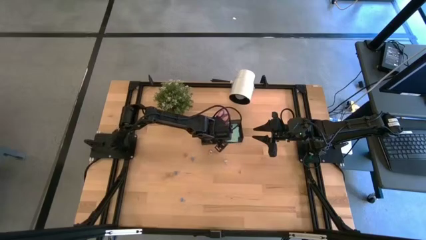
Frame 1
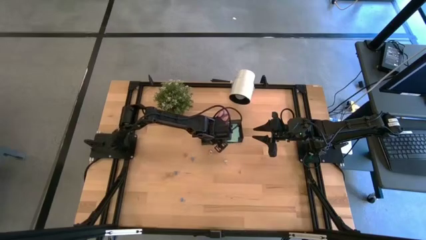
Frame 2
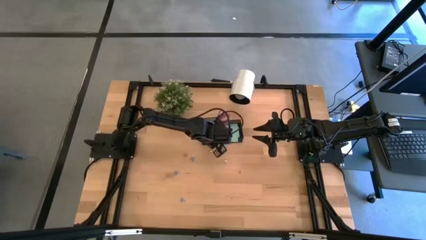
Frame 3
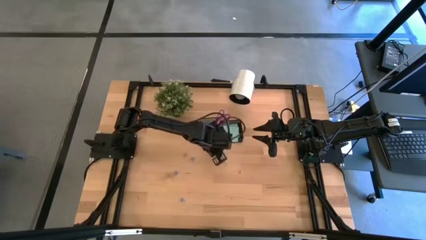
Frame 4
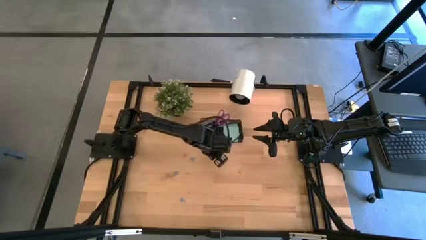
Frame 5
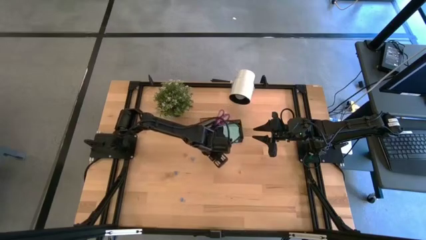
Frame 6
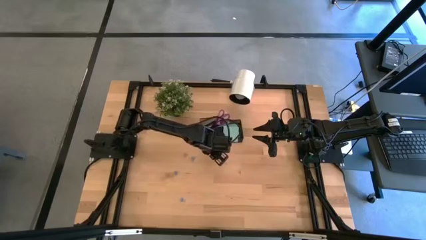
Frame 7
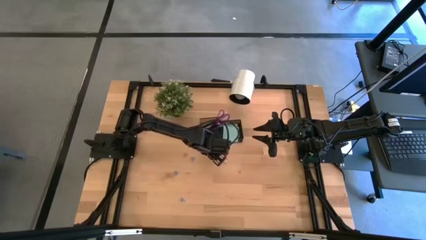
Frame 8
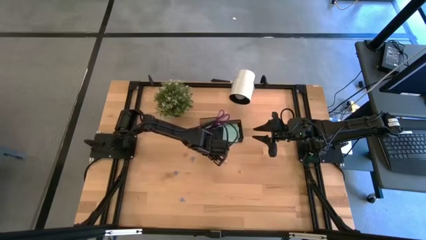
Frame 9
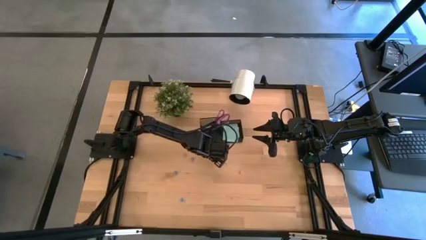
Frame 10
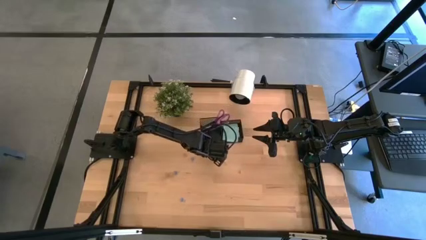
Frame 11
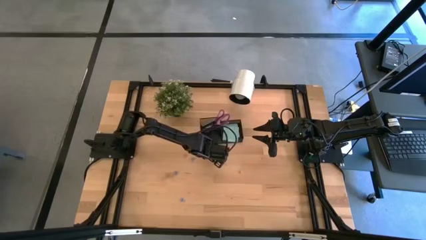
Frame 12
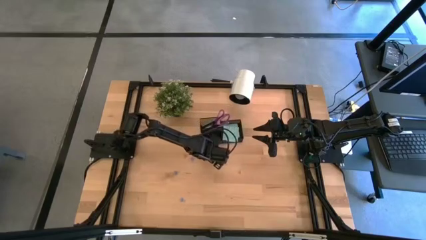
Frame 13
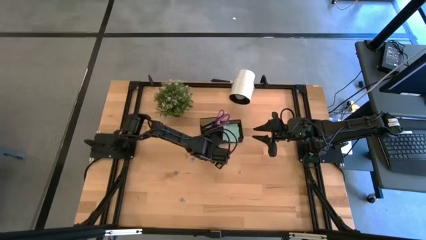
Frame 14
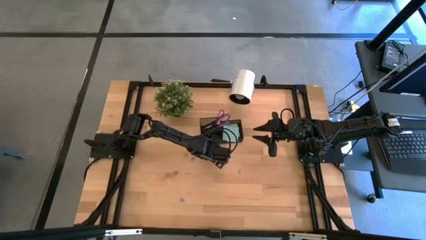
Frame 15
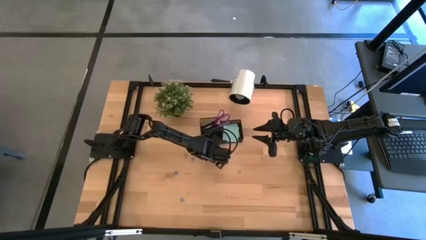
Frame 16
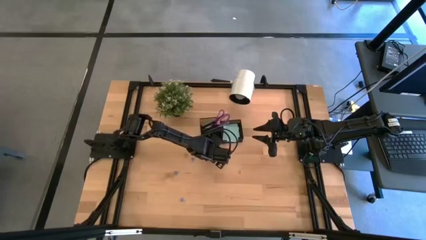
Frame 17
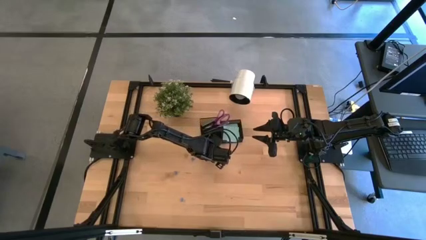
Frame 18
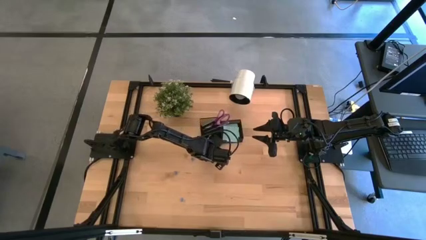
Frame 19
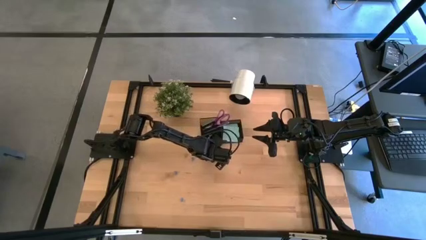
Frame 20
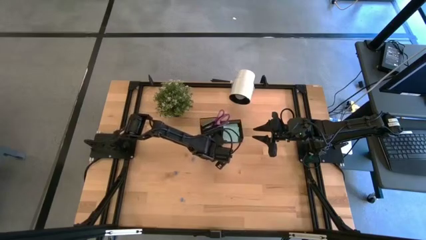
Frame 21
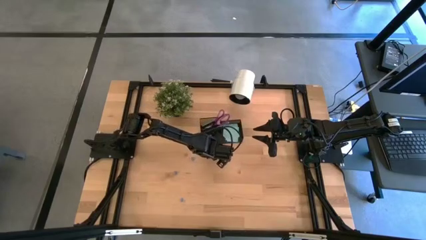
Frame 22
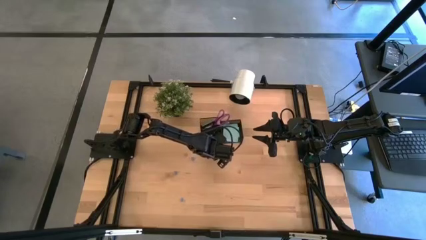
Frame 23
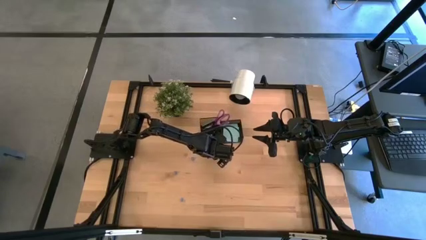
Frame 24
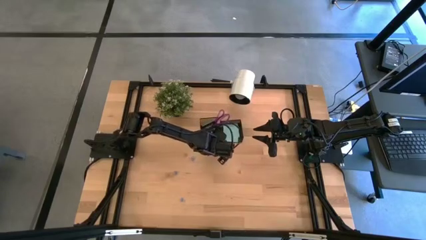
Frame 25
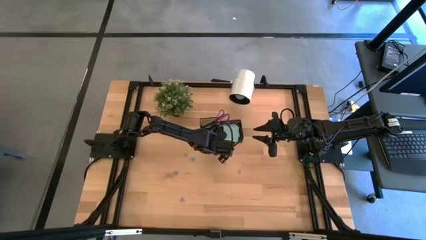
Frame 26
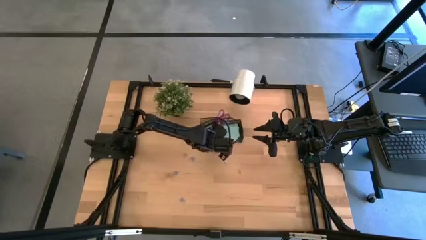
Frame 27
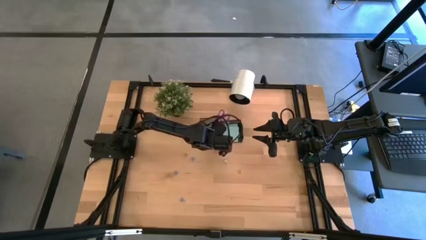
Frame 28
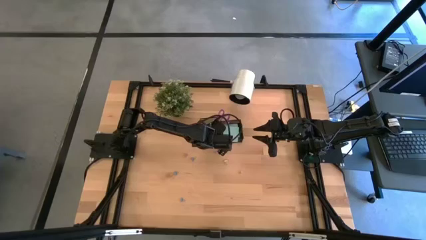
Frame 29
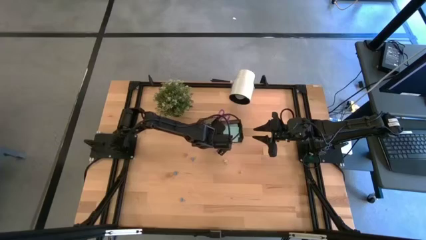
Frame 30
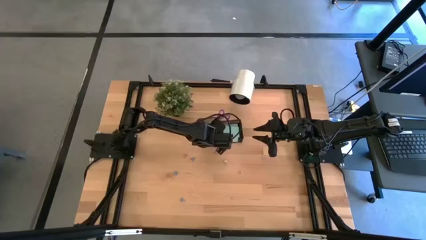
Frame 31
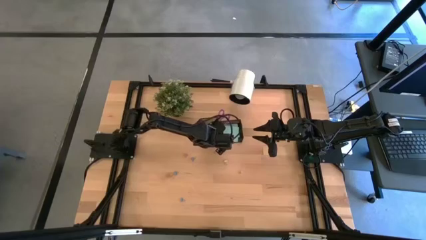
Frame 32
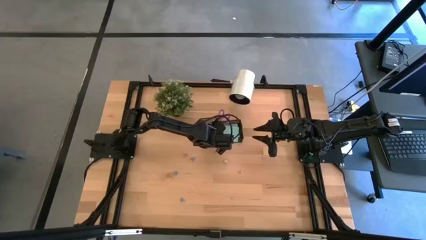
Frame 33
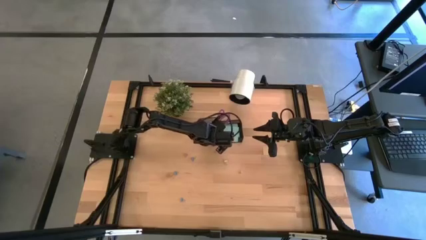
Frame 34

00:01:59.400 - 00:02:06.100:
Task: Pick and place office supplies into organizer
Put the pink binder clip into the black desk organizer

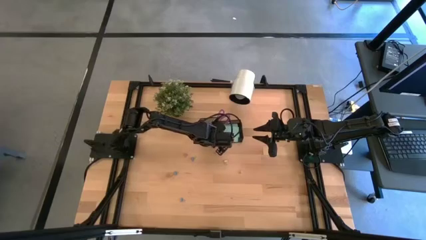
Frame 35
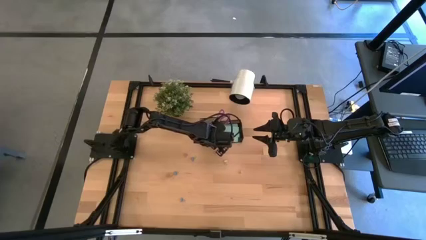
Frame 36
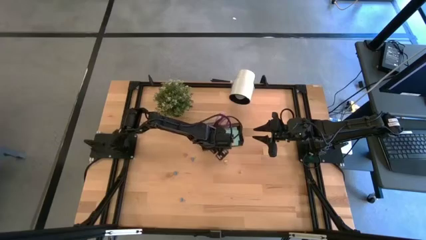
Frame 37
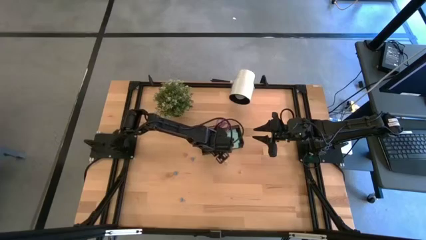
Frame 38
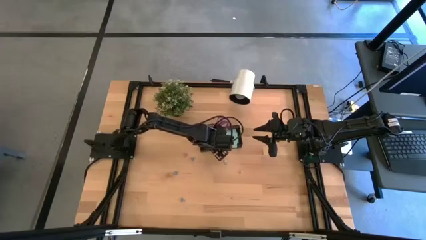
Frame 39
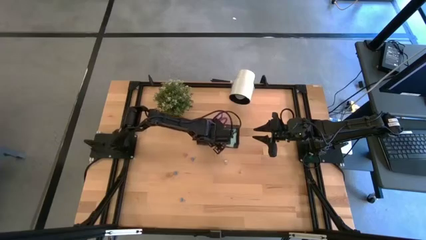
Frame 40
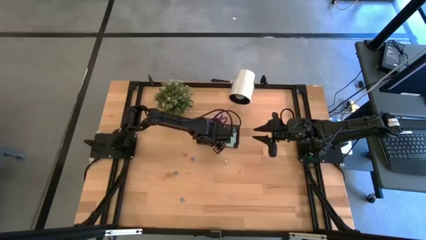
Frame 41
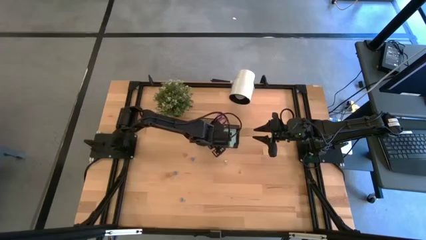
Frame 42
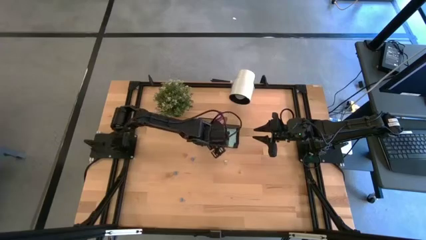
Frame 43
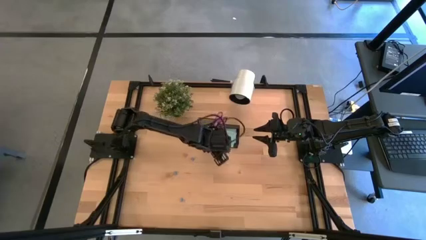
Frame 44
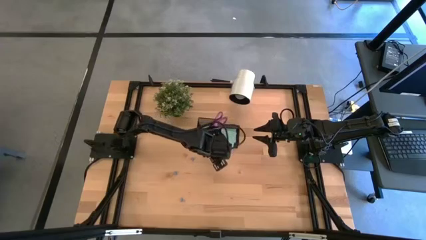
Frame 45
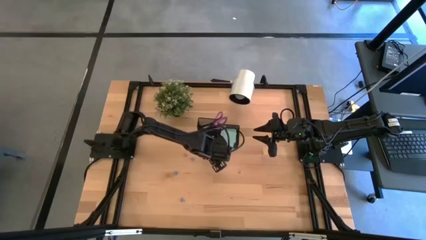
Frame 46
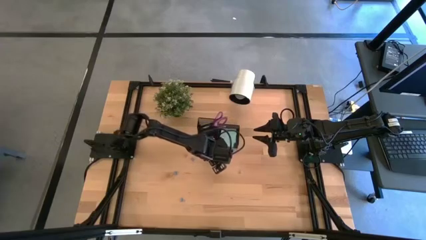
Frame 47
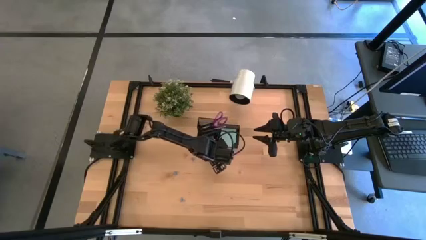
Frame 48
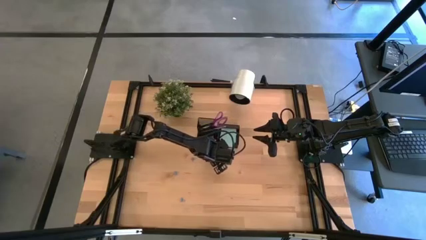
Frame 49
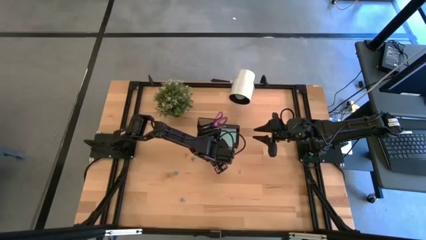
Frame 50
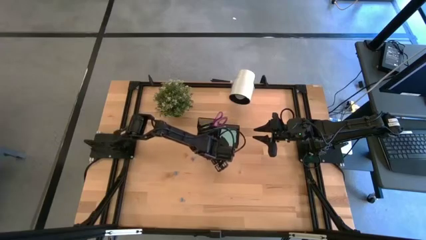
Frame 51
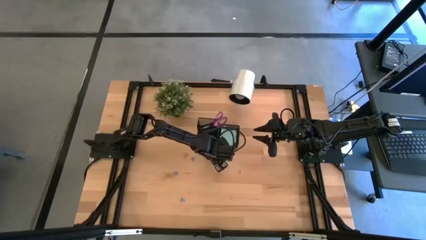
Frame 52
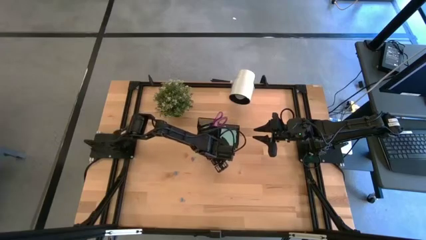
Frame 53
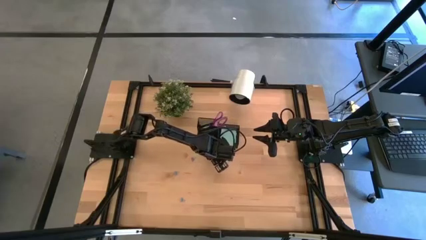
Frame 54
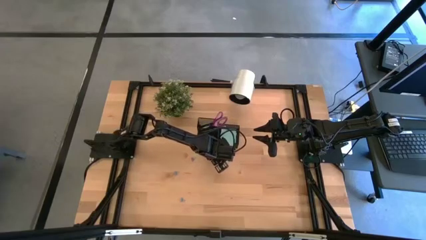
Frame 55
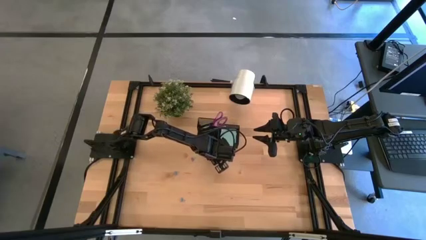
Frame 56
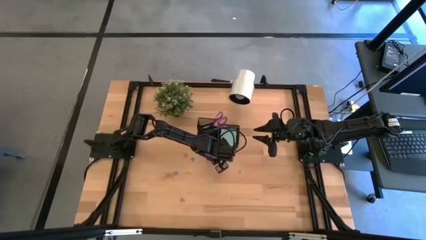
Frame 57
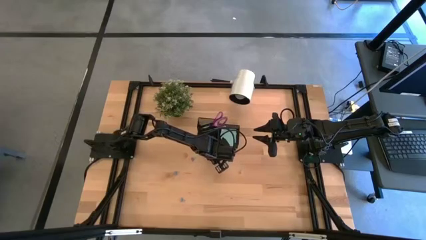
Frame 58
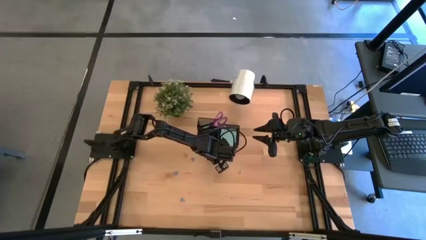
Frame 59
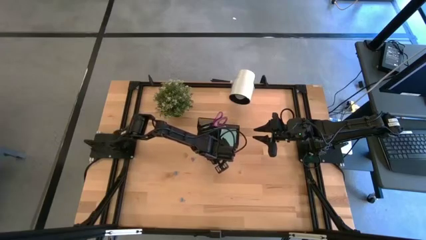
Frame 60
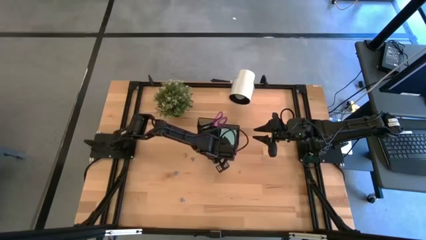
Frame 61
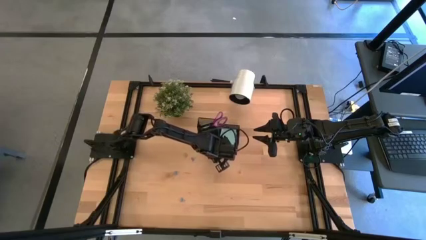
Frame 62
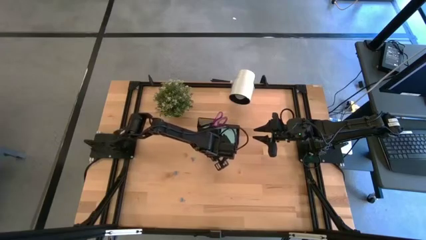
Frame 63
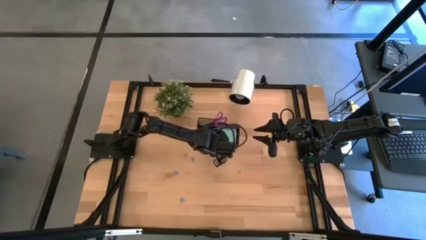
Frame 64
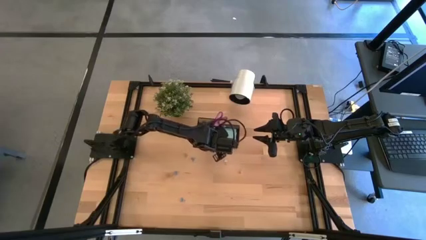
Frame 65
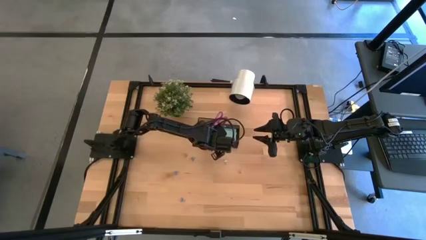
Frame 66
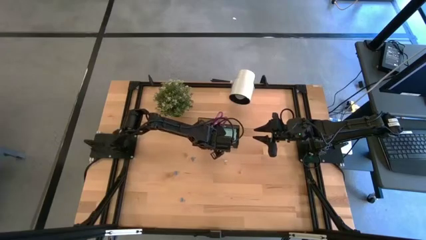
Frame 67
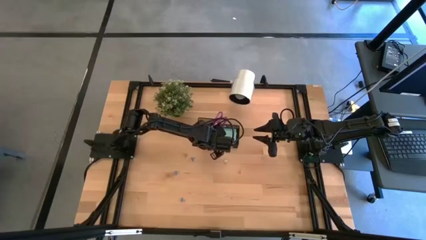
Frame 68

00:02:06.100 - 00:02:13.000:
Put the pink binder clip into the black desk organizer
